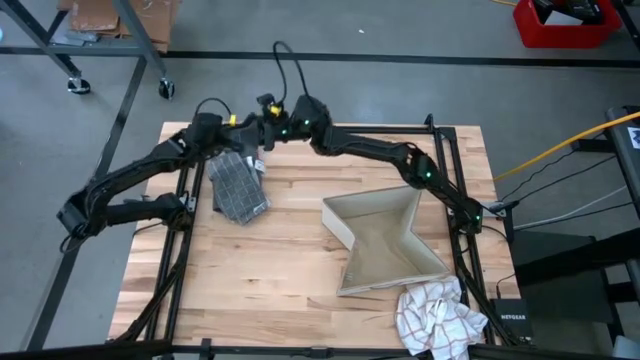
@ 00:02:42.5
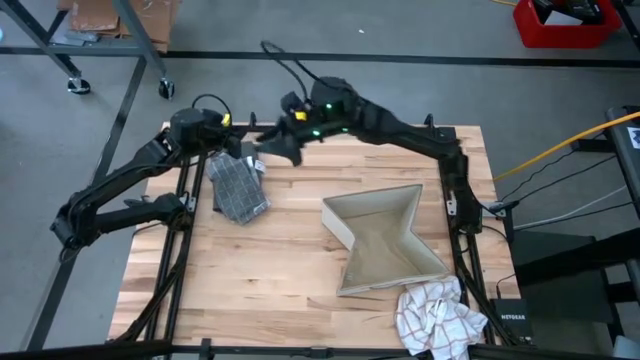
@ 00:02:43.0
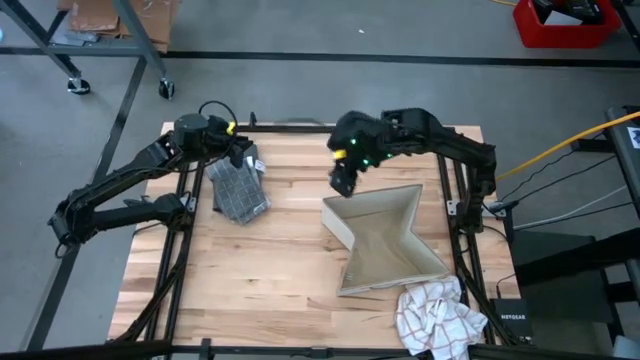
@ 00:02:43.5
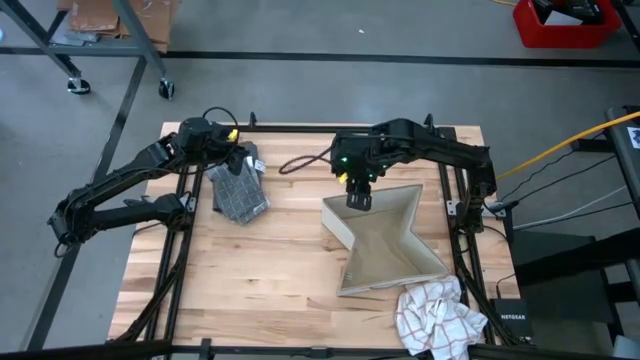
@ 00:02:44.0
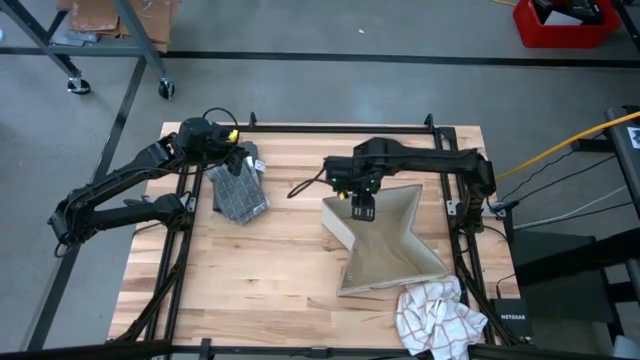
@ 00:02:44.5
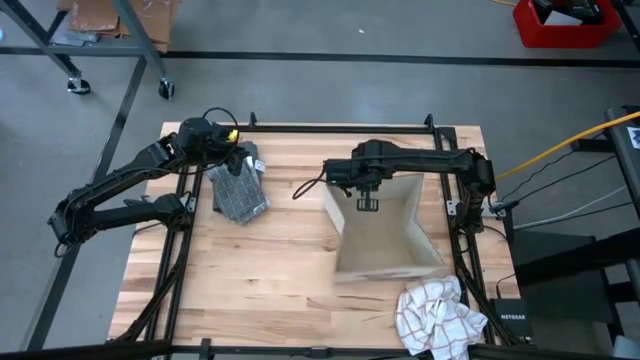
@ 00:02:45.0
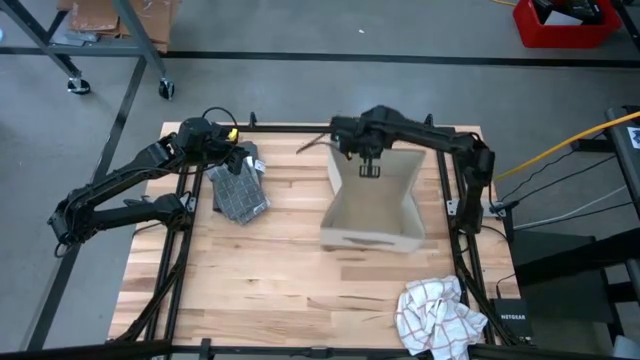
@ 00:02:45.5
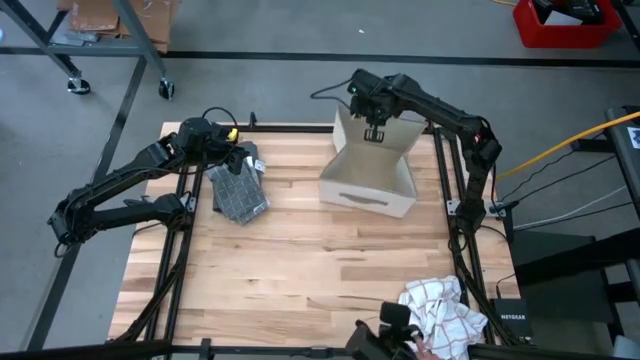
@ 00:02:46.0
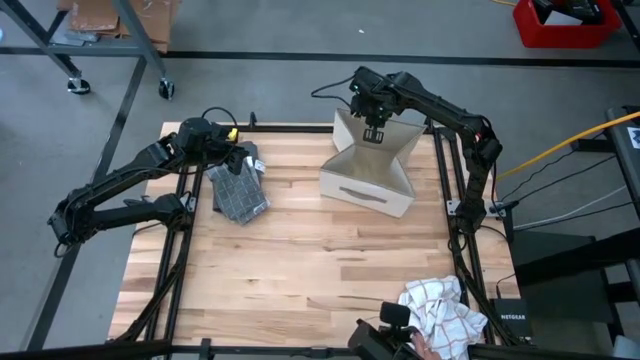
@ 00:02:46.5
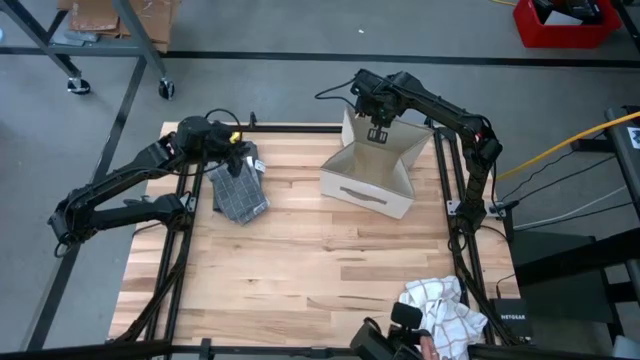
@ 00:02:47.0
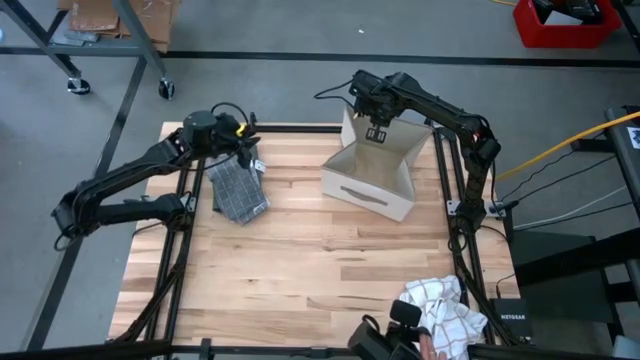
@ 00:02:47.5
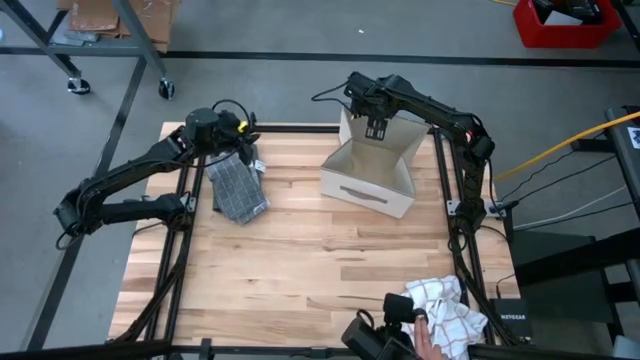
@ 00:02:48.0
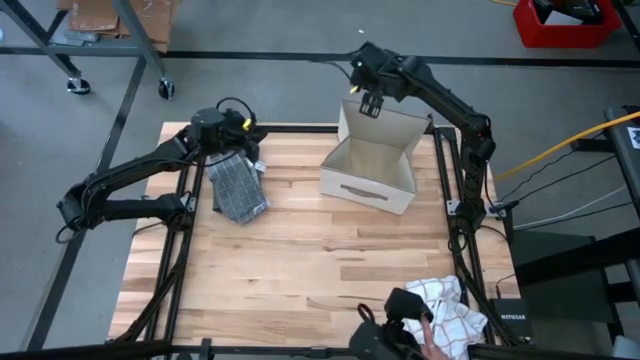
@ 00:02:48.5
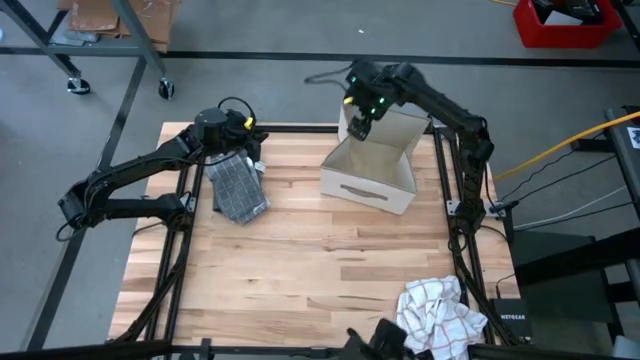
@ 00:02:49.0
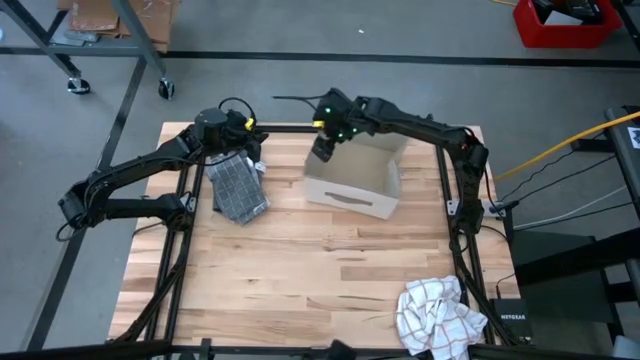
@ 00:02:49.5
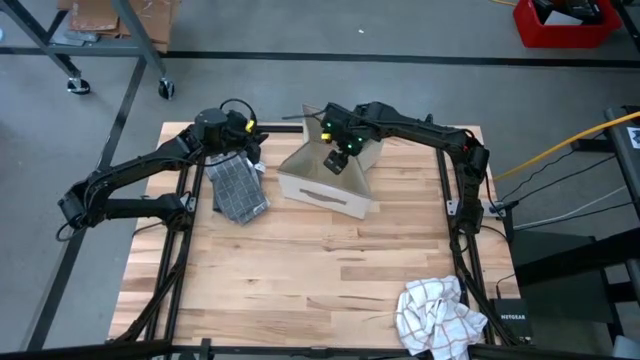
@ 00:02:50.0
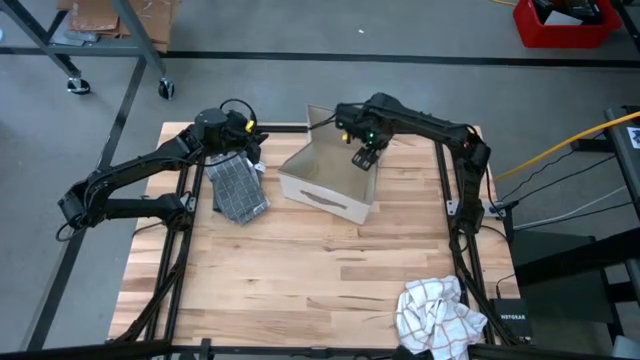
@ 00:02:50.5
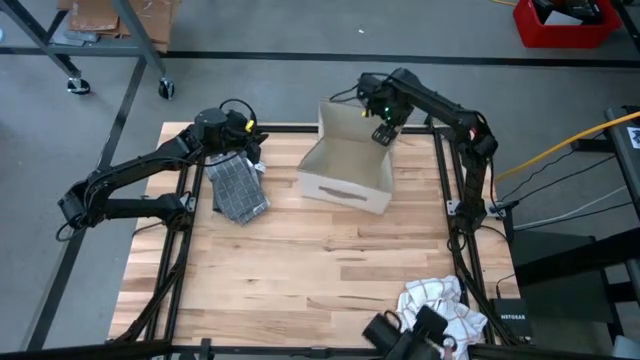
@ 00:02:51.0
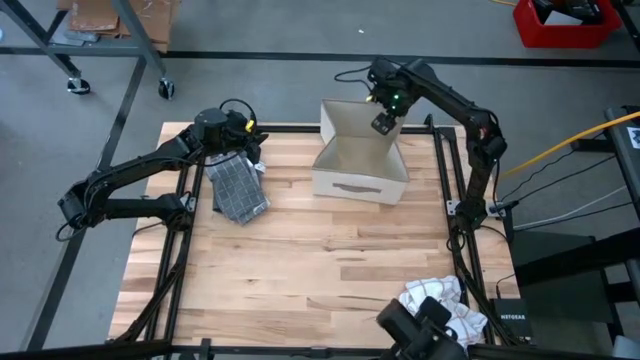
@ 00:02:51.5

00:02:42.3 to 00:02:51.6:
Task: Fold towel
Move the white laundry organizer to the top of the table

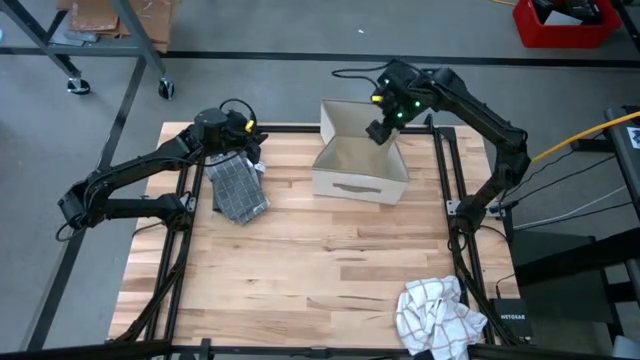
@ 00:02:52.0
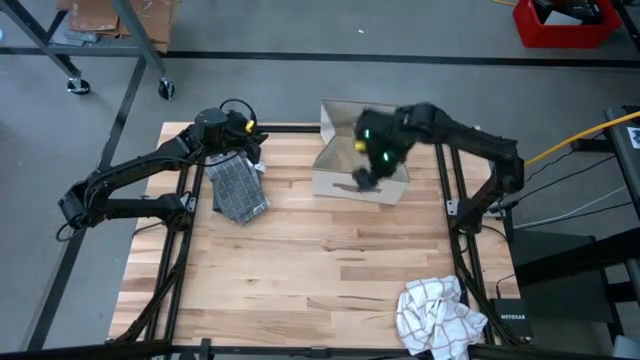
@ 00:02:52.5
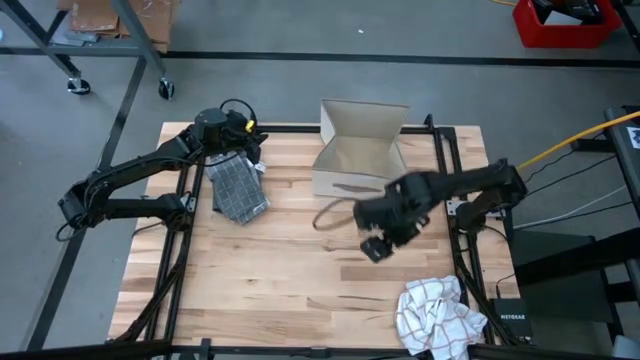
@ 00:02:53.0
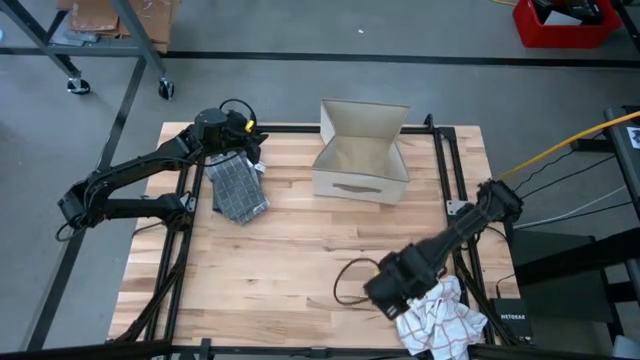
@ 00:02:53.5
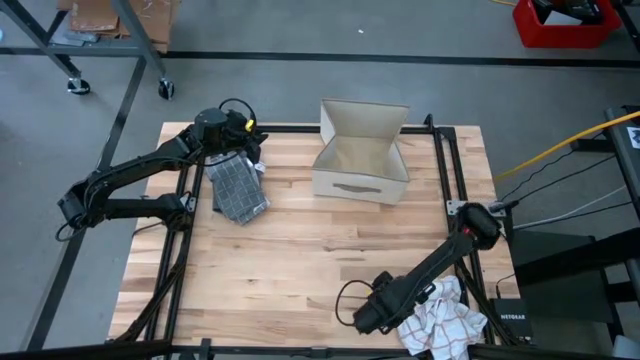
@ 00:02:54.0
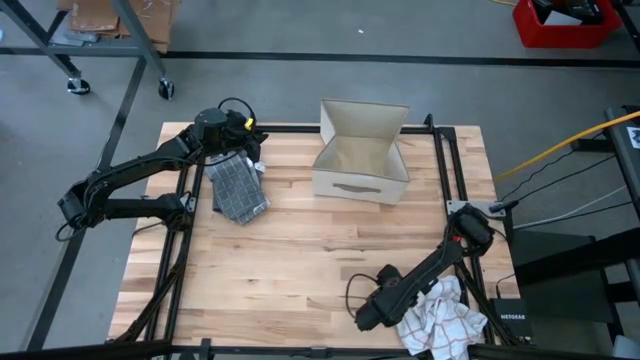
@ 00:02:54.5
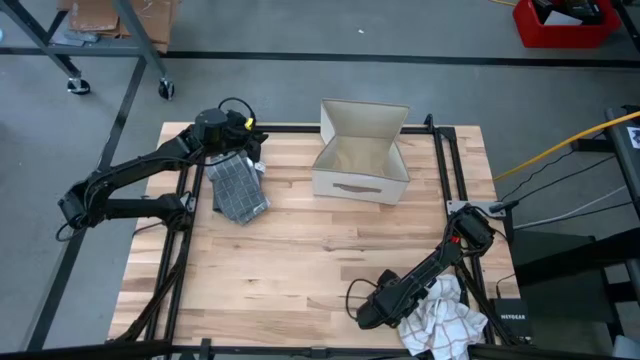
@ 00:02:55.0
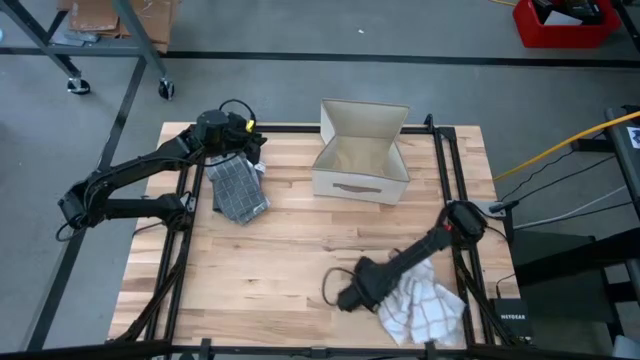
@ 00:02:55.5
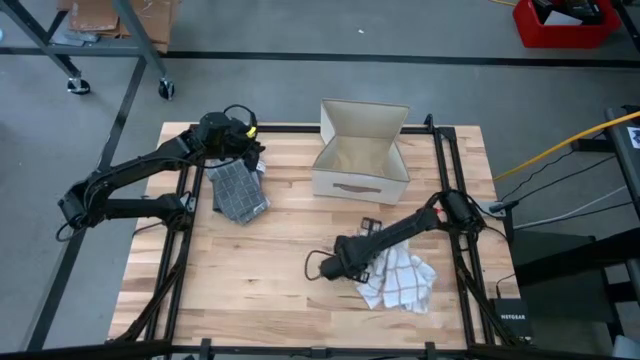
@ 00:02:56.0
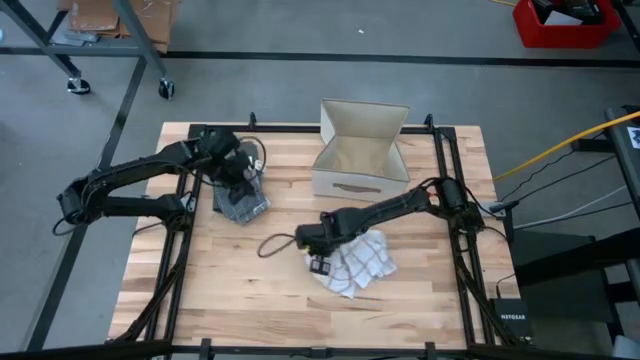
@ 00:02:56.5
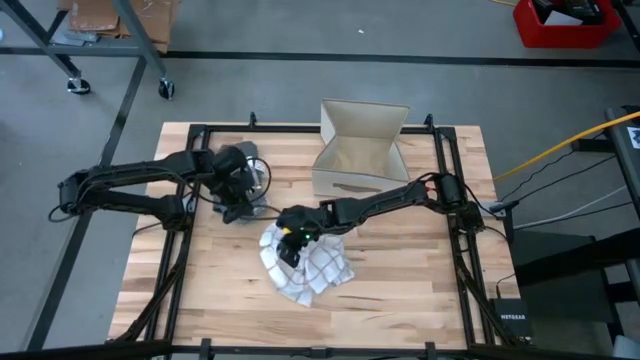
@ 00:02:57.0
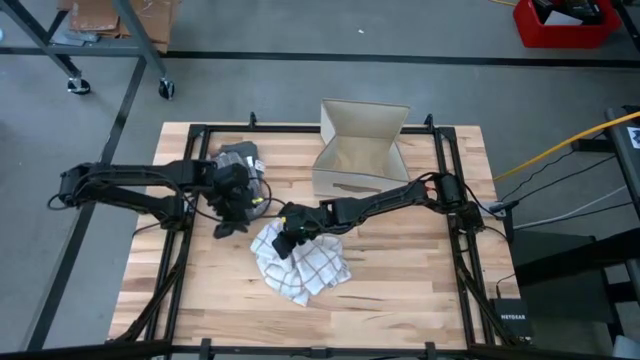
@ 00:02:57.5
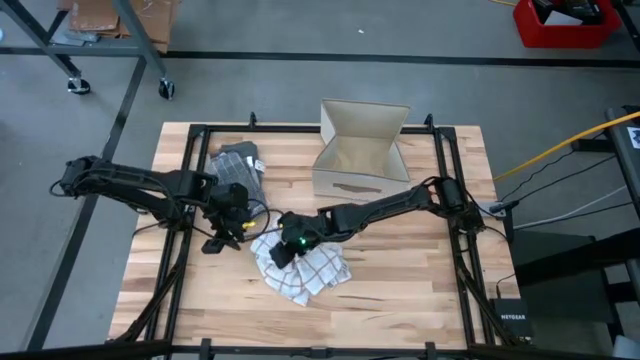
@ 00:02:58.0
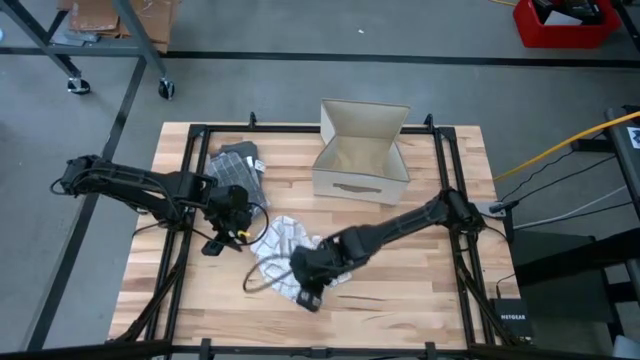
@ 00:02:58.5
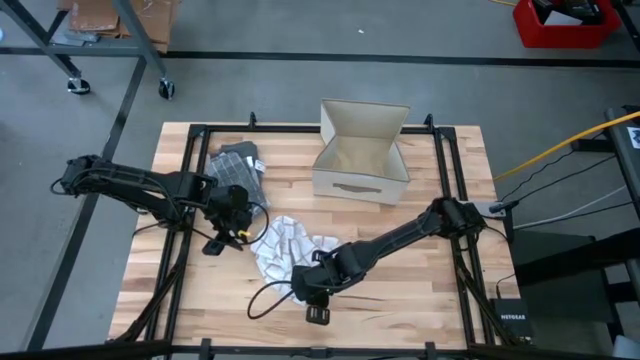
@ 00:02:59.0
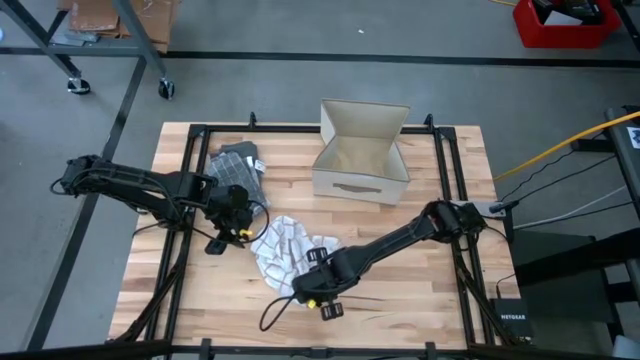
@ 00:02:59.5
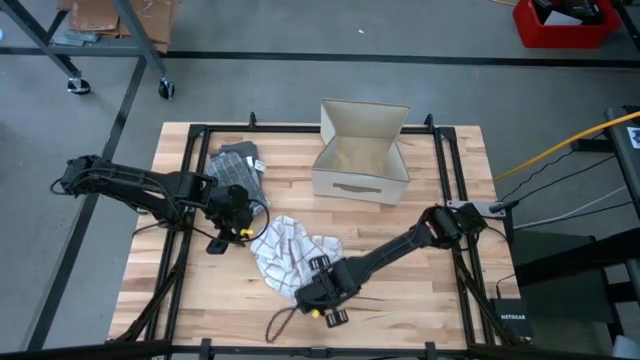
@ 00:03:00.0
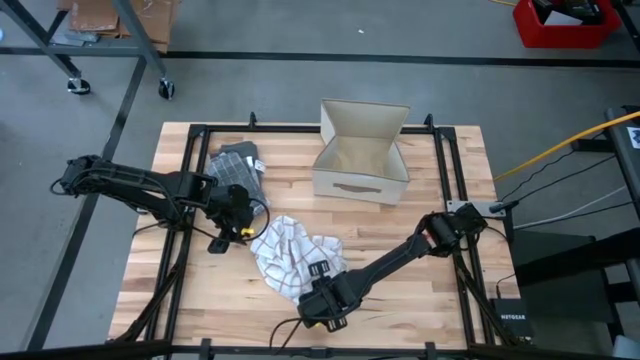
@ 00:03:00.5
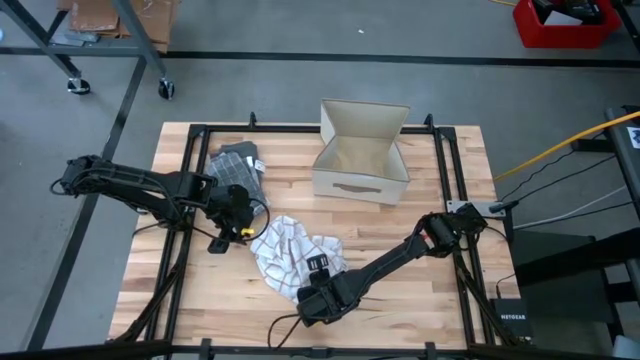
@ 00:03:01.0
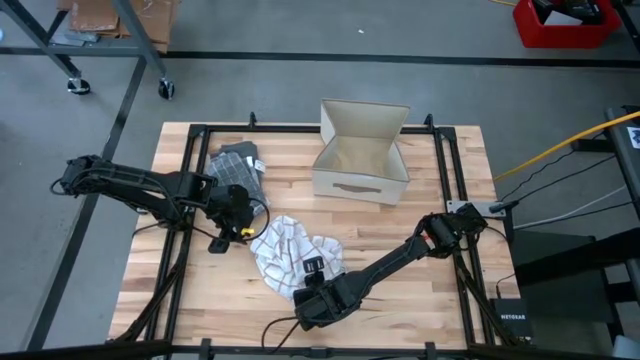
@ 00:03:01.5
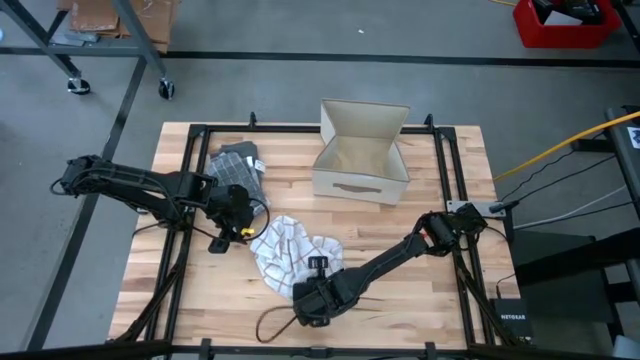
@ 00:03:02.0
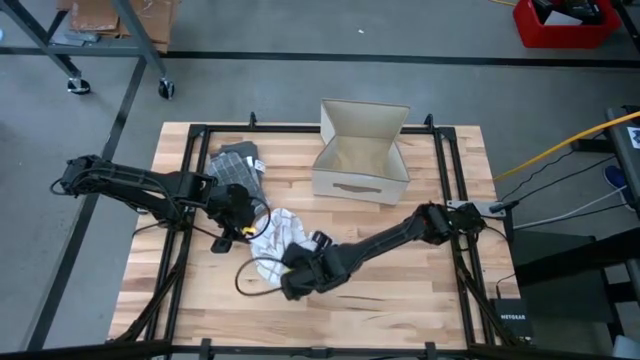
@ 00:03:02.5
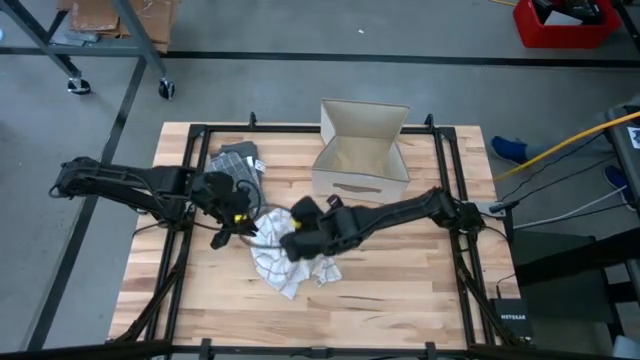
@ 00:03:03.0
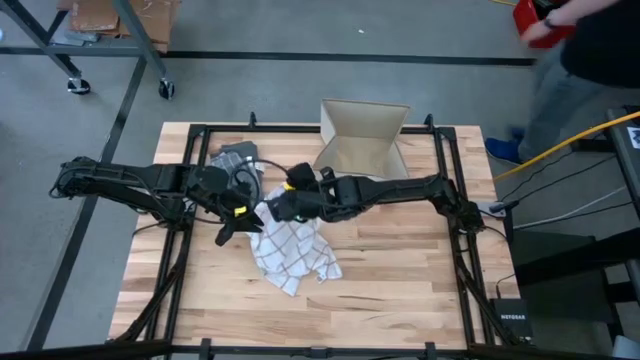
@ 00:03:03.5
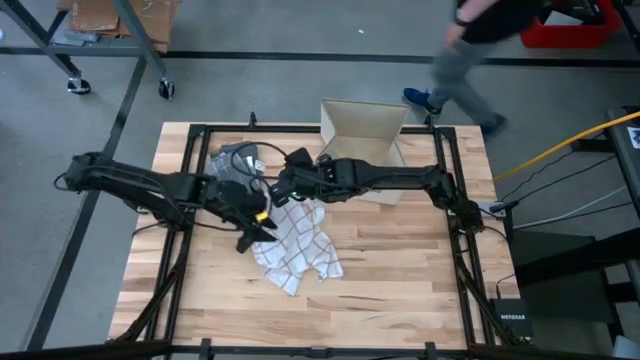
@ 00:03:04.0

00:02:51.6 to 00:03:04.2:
Fold the white towel
